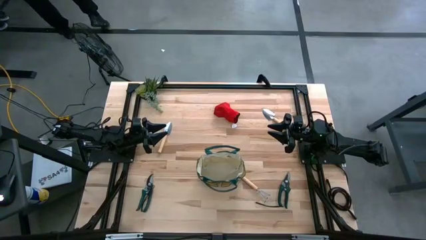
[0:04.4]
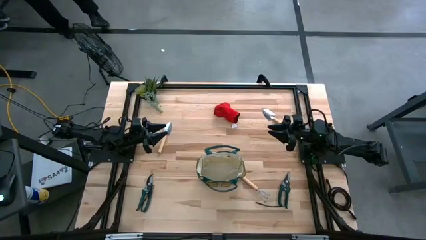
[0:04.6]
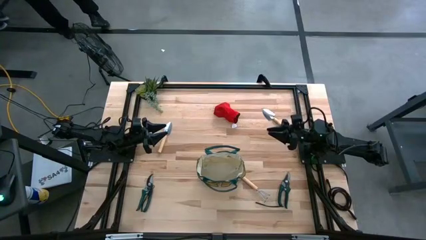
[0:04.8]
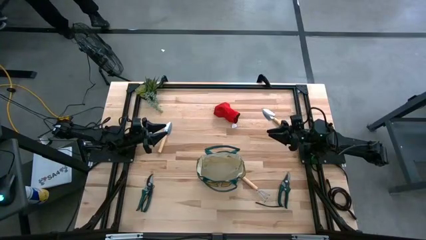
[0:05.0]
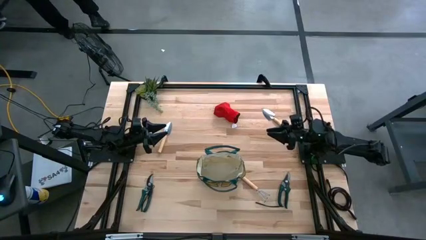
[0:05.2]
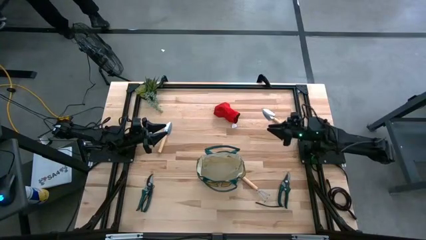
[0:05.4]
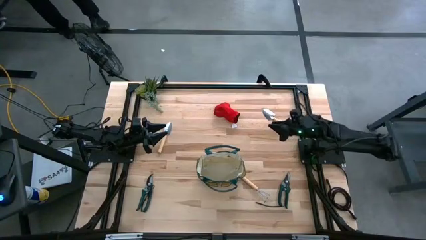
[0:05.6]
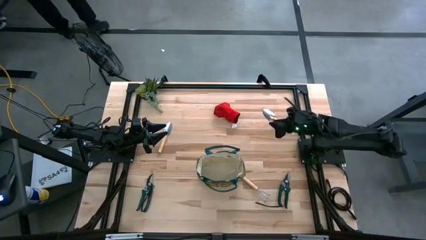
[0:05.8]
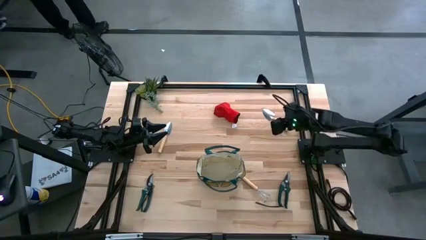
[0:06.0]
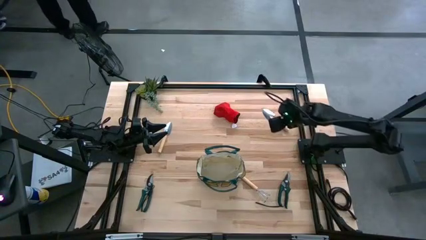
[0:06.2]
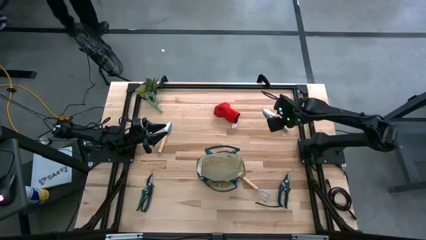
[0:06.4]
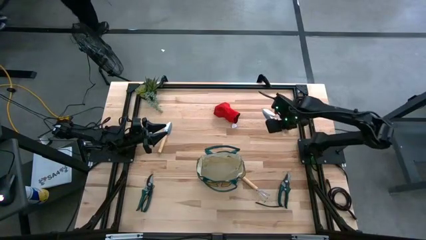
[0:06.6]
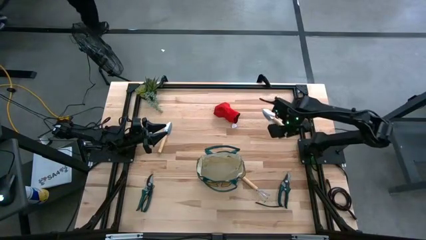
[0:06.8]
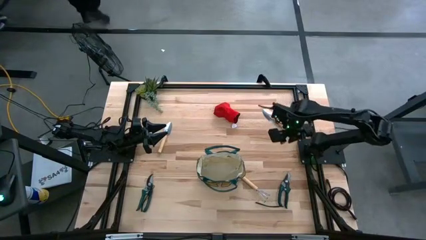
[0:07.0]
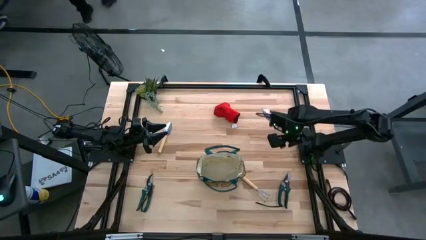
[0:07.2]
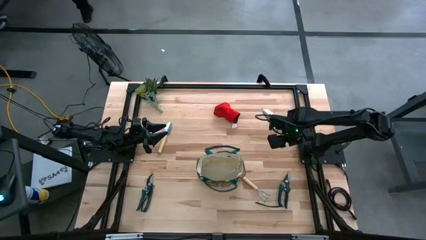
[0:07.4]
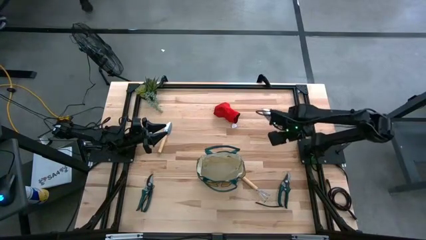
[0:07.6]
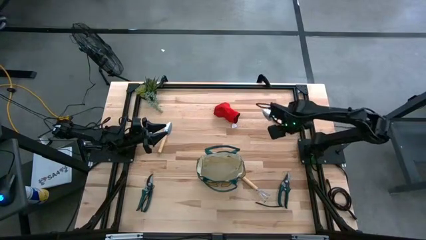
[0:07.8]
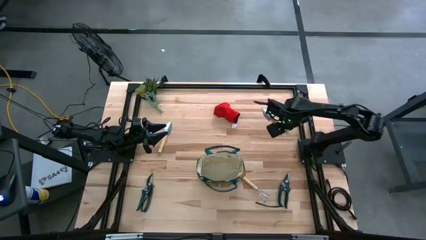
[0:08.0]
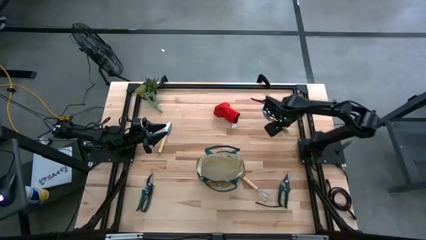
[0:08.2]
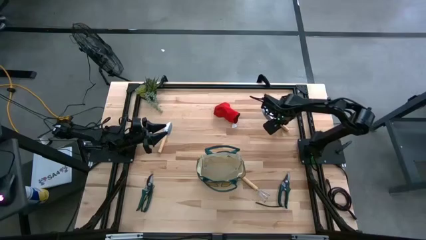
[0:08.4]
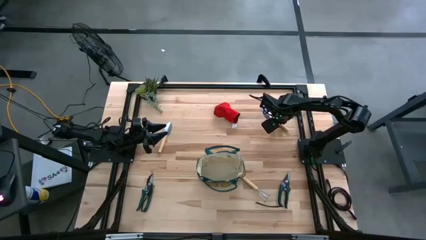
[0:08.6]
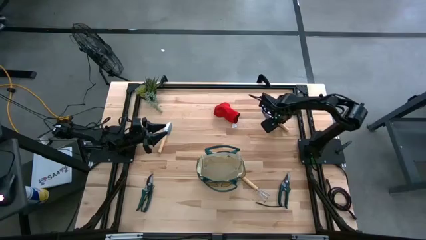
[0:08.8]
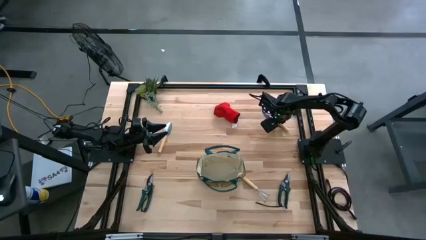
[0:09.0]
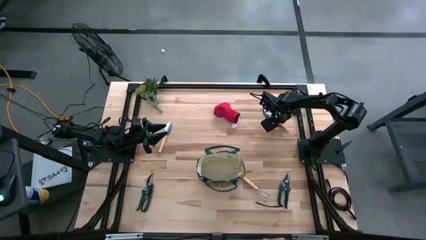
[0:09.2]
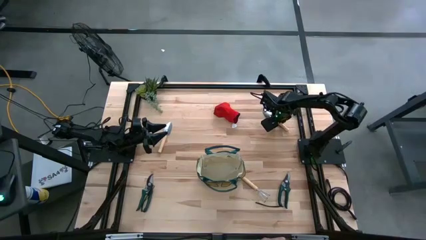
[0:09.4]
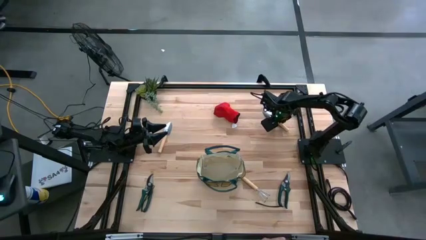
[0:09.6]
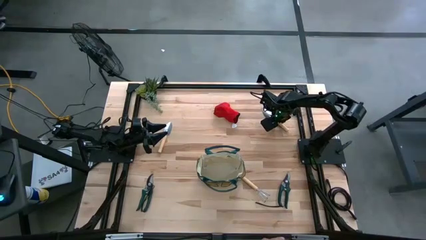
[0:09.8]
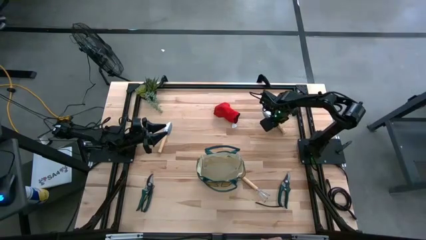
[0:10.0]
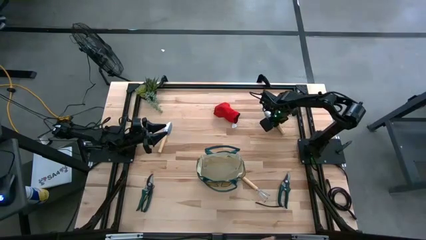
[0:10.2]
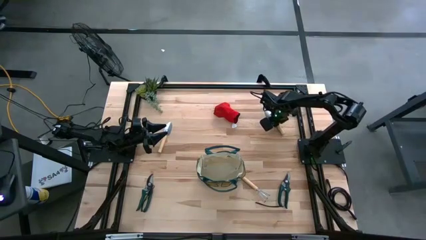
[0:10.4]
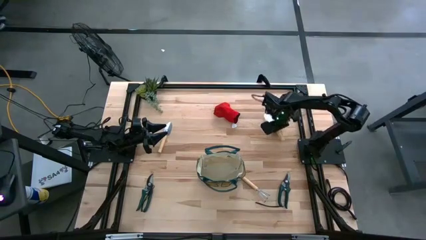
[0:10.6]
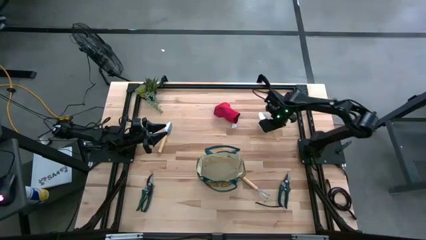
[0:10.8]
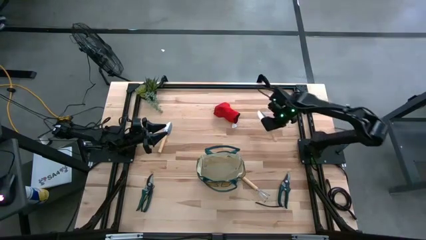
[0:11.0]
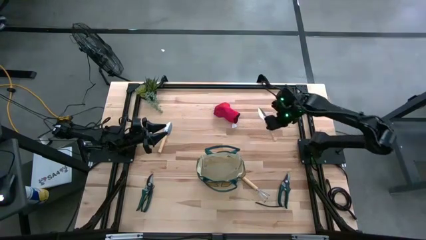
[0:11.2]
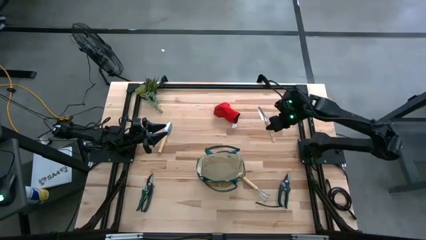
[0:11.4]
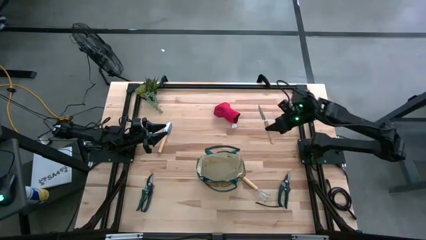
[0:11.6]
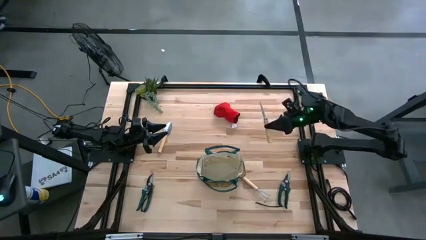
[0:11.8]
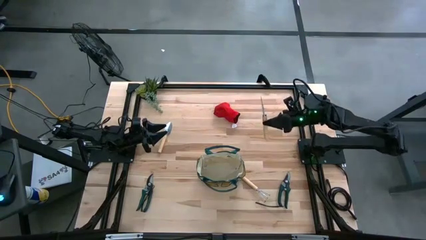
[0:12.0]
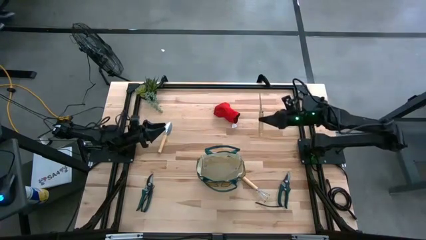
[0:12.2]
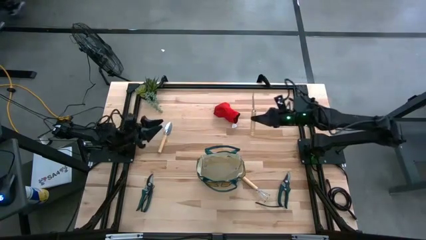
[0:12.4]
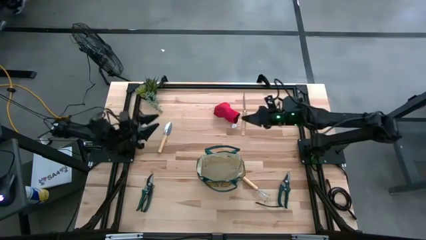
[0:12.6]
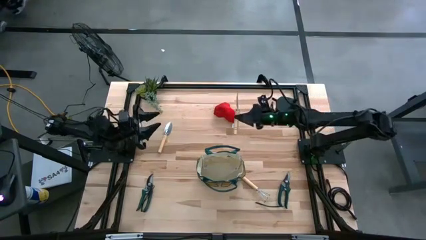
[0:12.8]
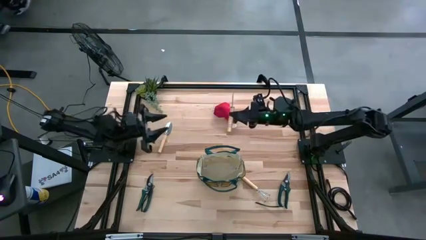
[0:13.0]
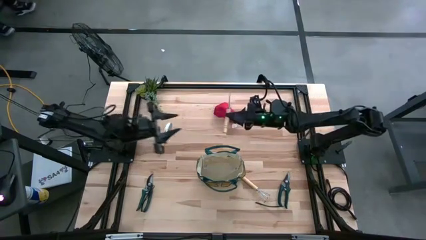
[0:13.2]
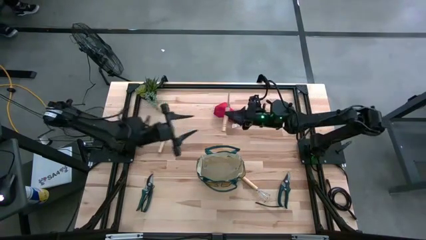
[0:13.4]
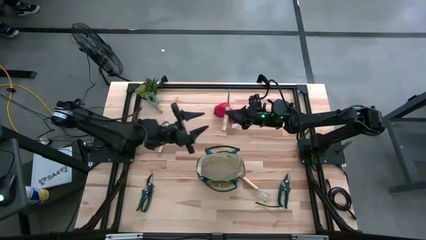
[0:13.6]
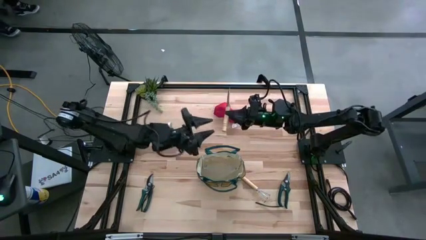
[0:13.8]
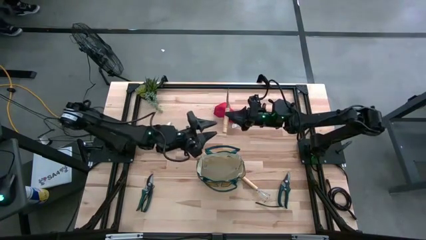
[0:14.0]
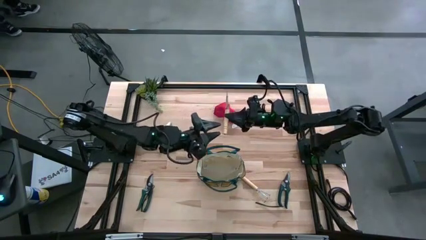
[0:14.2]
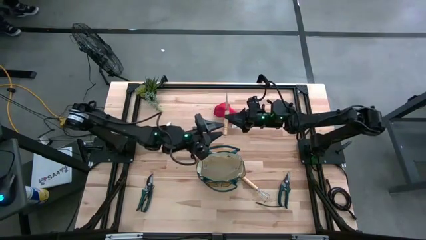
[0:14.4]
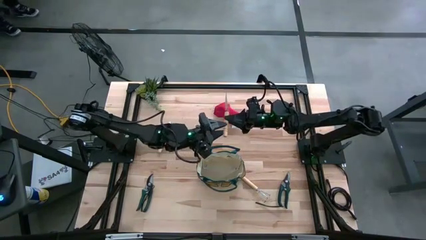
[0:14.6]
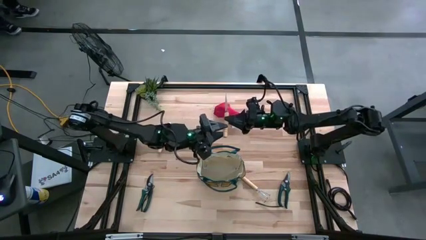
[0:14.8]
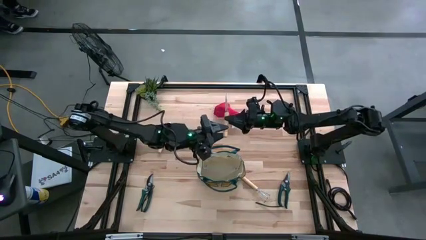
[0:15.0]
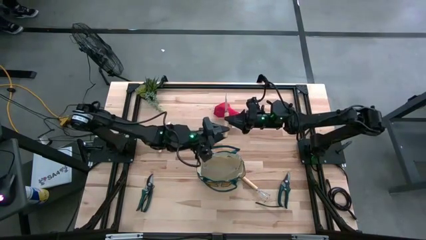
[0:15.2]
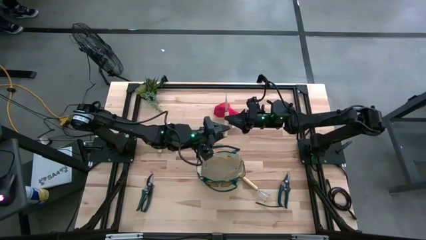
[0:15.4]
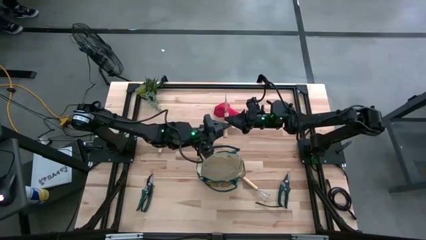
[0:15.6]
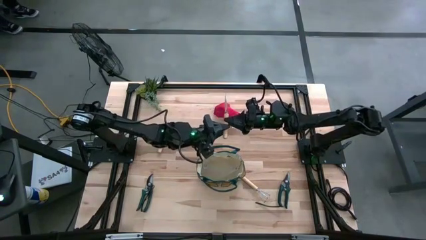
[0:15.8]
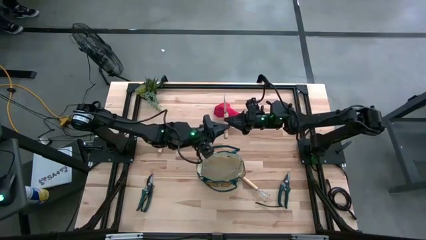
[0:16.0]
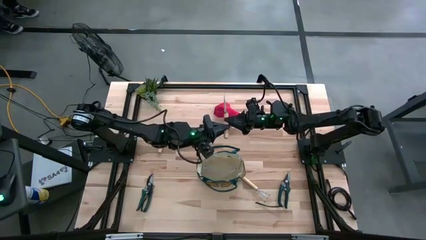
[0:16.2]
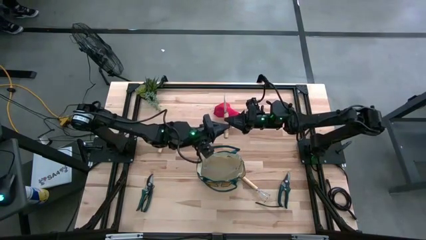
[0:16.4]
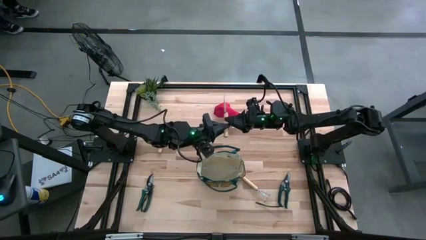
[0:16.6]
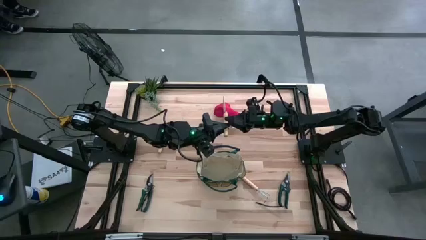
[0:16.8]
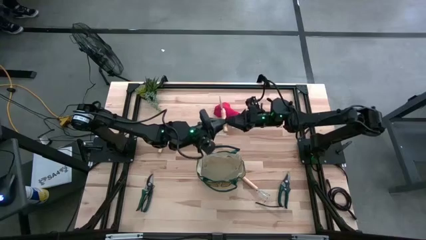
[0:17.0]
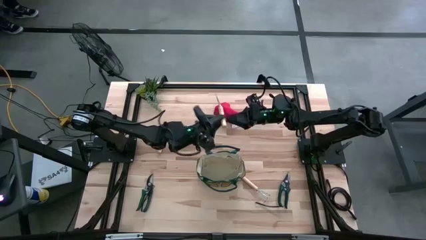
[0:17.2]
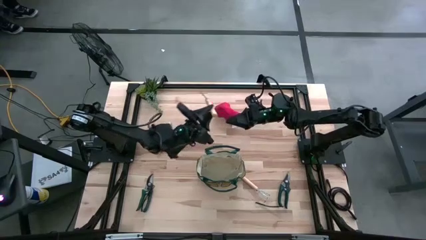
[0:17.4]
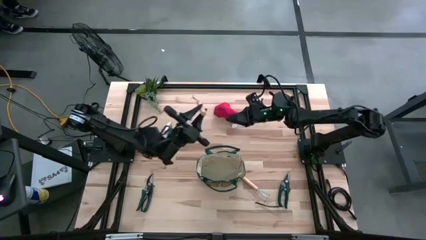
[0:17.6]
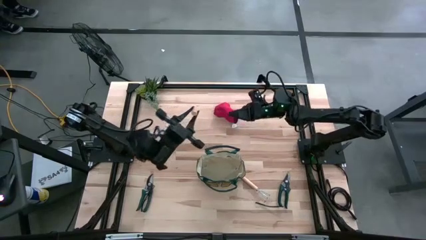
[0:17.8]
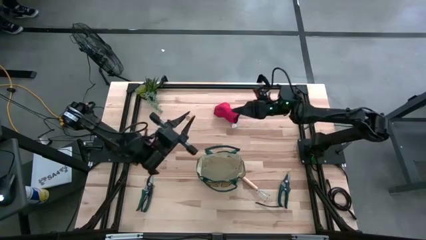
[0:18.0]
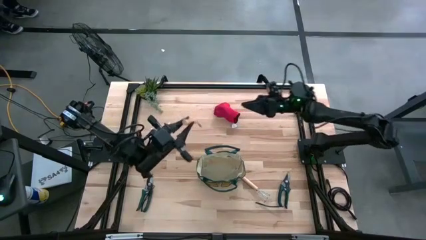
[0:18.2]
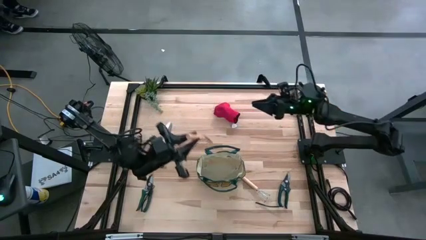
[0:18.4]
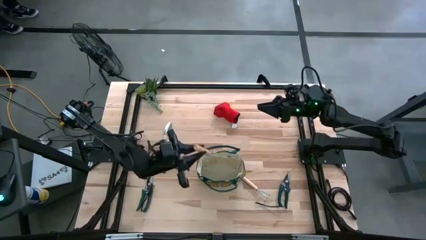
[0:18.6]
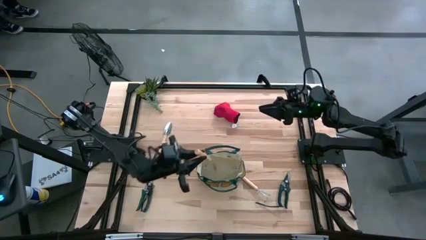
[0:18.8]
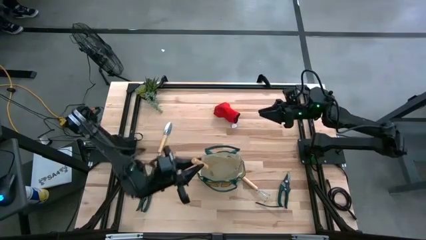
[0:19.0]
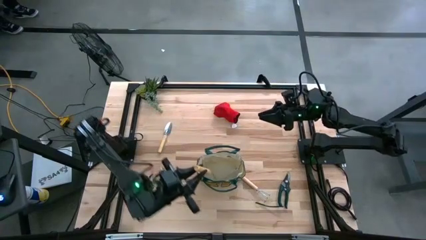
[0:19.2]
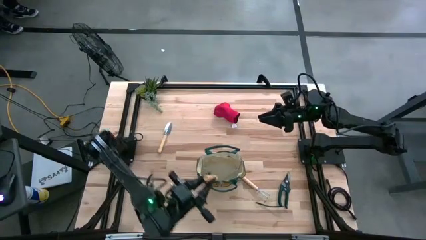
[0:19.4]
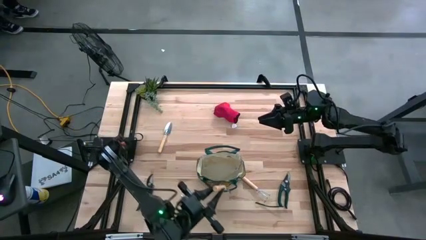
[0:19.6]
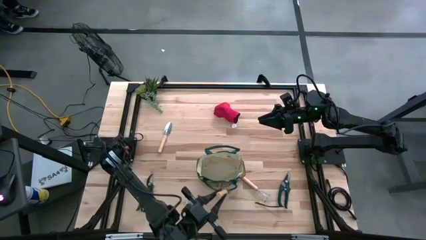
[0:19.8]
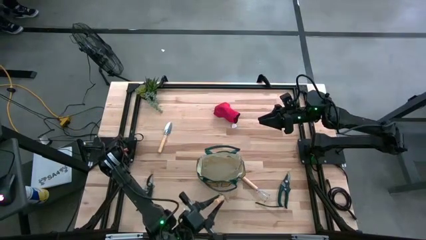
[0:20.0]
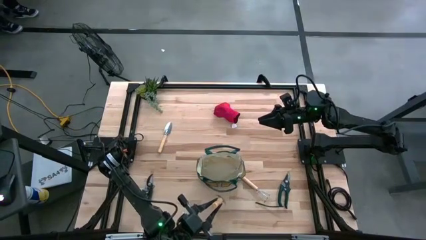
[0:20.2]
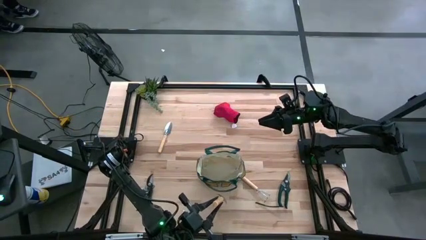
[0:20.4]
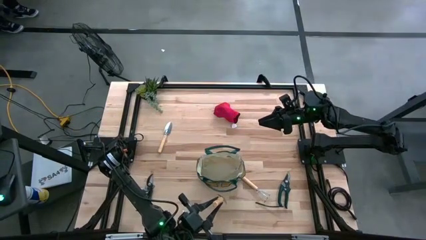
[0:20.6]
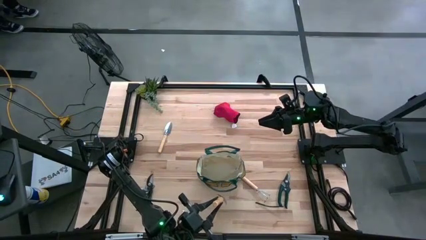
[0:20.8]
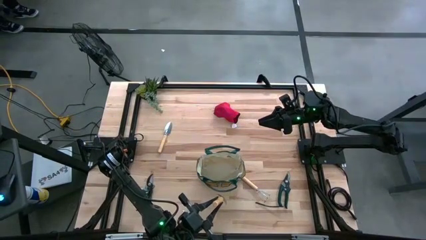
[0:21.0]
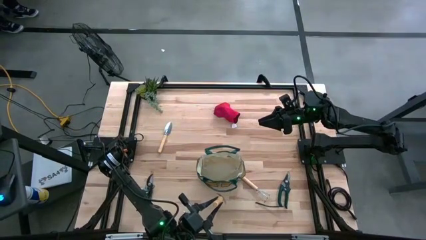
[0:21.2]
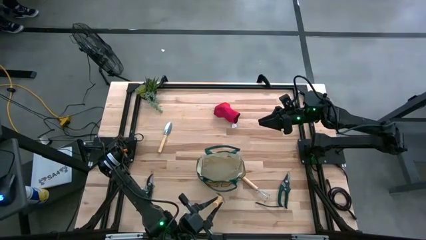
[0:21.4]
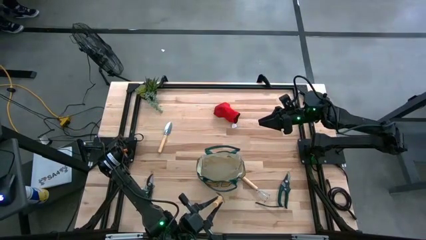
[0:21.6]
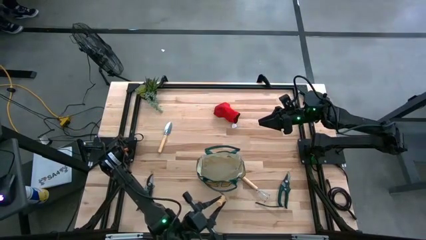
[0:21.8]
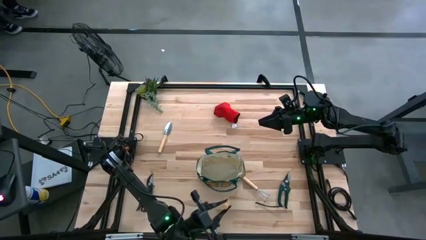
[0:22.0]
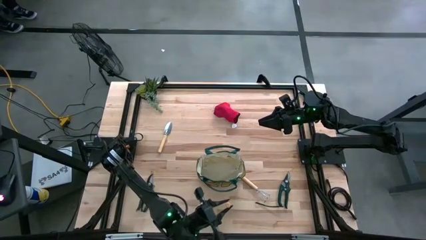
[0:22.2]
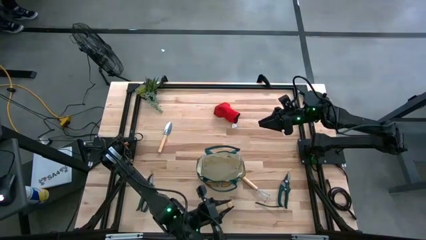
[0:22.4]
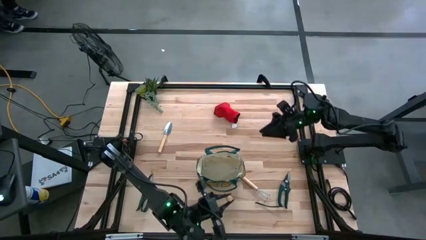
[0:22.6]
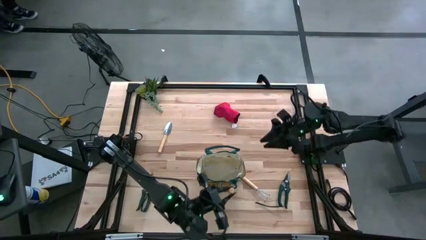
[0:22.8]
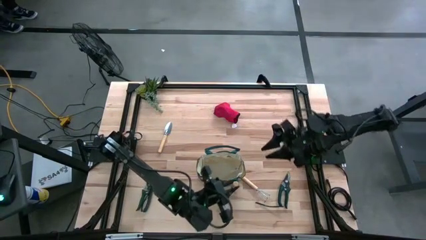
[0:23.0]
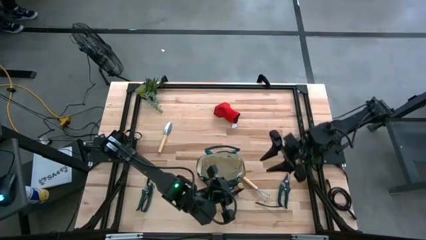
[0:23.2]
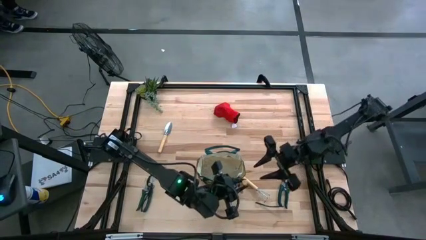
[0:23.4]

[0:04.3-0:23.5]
Task: Pick & Place Garden tools in Gardening bag
Put the brown trowel into the white gardening bag
